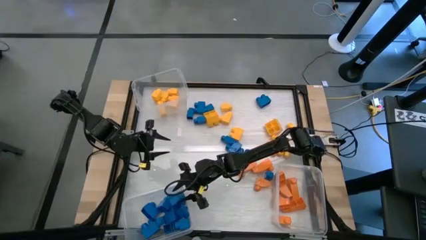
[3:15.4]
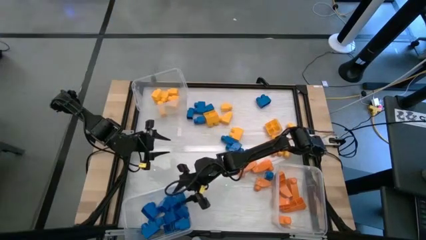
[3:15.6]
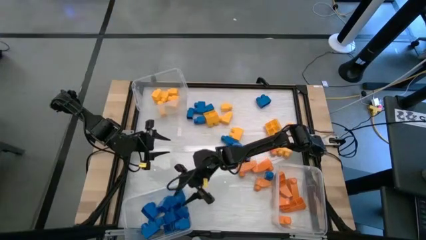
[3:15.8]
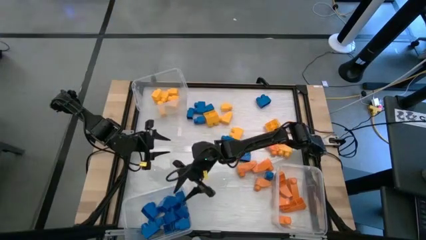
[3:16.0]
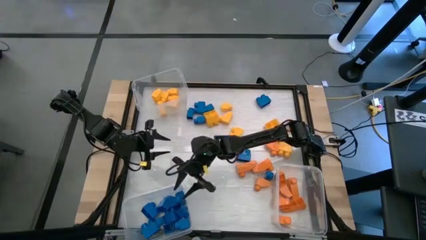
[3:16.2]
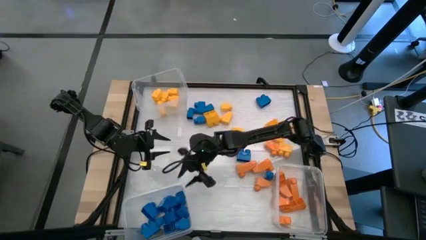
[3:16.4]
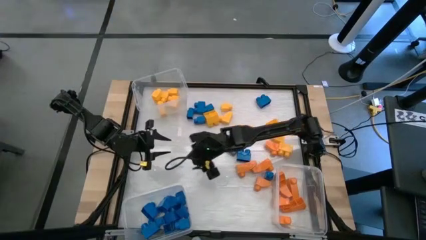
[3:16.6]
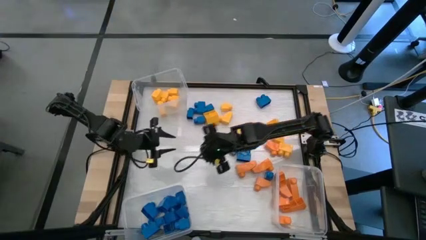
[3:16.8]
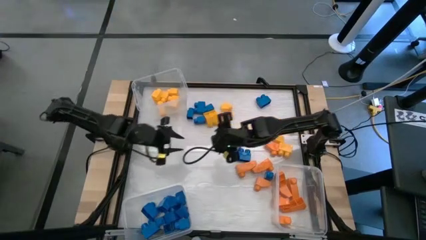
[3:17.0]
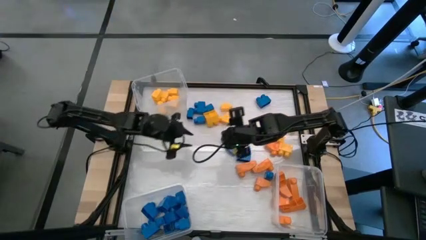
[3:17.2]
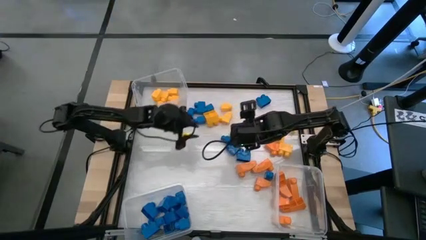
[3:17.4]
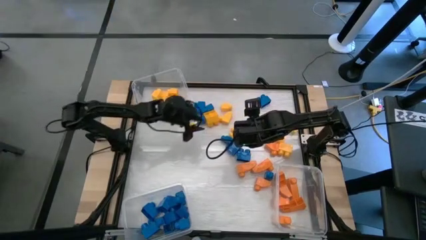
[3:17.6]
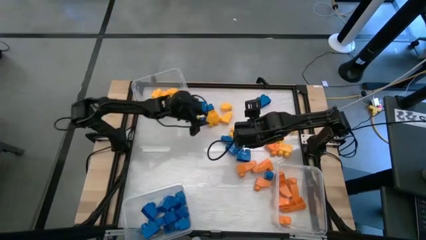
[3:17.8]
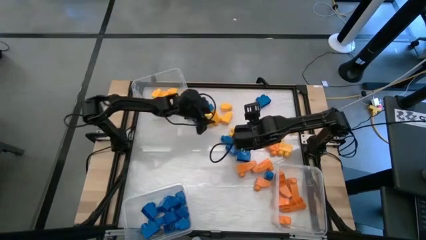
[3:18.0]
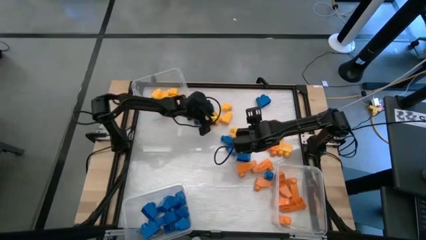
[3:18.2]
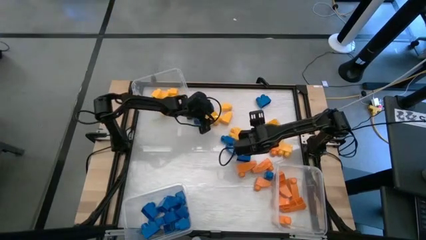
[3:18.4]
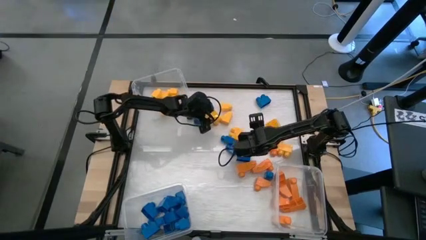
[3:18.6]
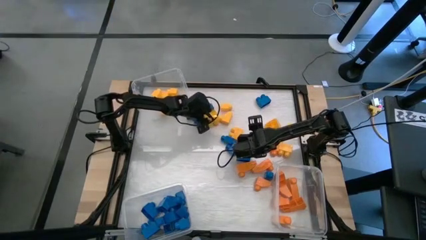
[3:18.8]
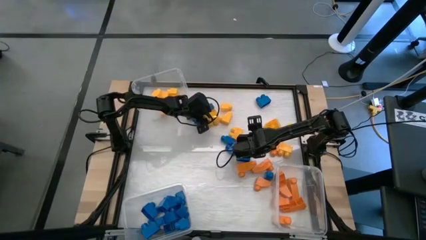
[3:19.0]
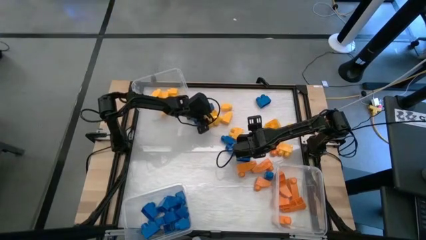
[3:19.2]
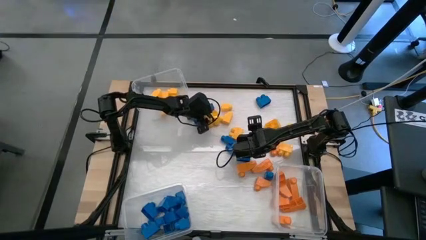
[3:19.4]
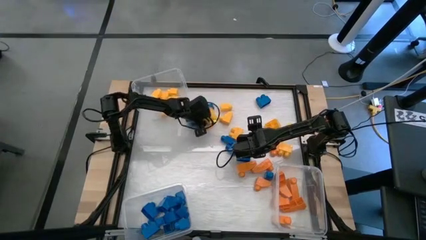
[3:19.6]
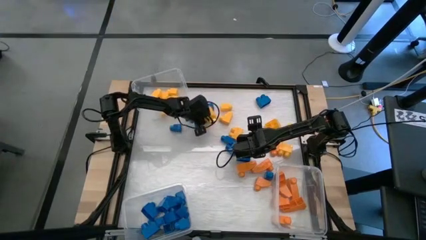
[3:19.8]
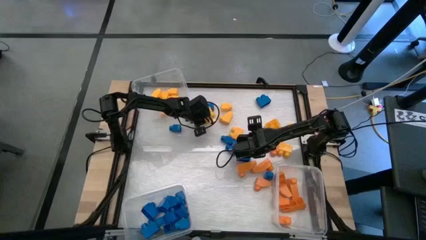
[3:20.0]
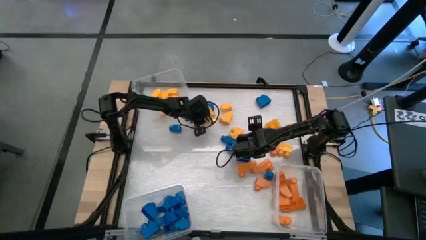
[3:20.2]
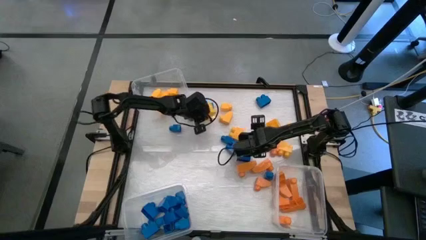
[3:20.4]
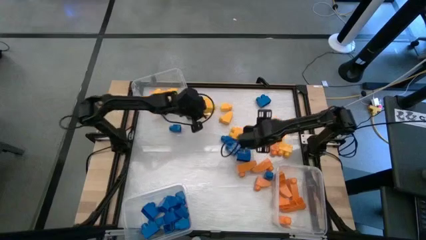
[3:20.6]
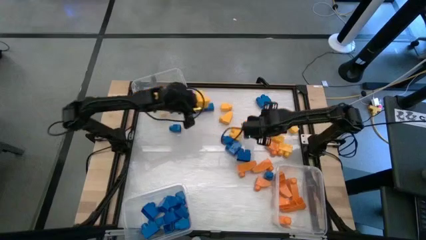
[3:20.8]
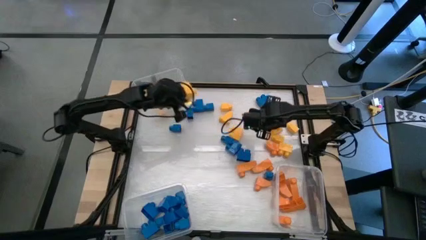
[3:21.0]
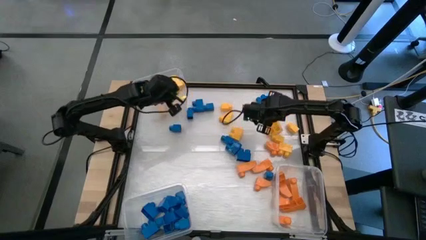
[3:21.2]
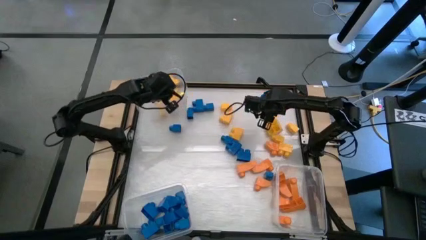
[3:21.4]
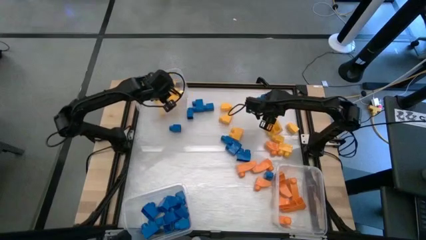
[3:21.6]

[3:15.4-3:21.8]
Task: Sort blocks
Put the yellow game piece into the top transparent bin

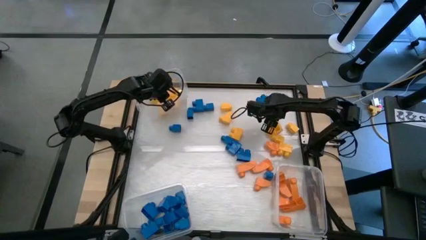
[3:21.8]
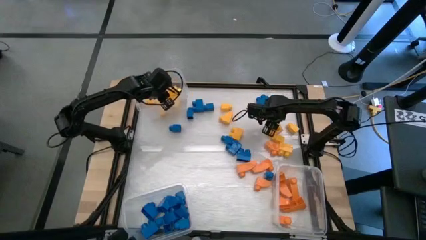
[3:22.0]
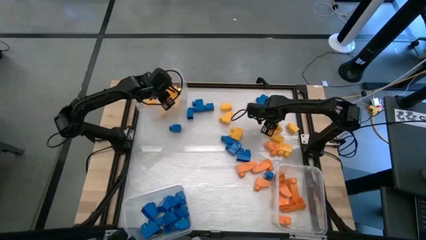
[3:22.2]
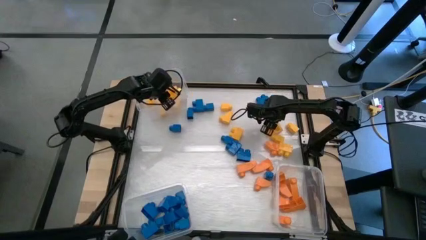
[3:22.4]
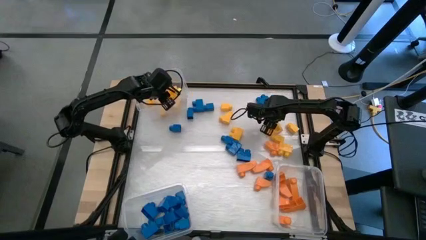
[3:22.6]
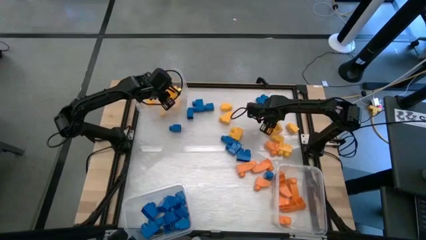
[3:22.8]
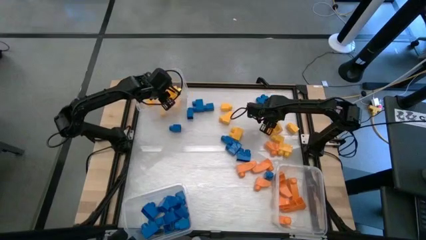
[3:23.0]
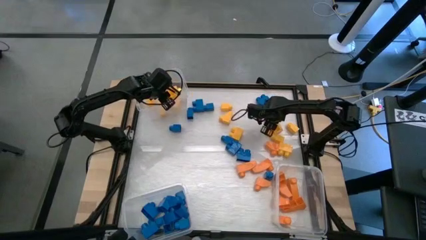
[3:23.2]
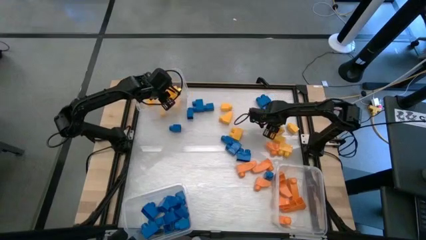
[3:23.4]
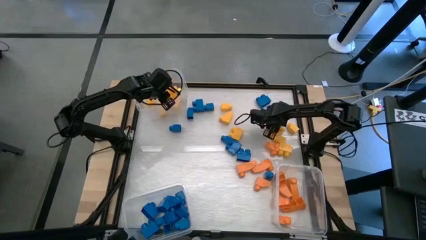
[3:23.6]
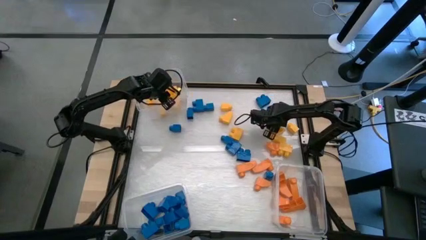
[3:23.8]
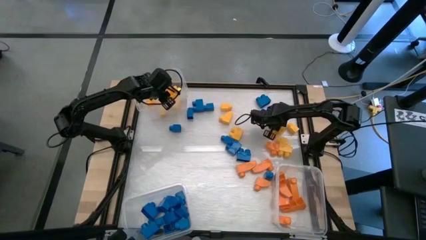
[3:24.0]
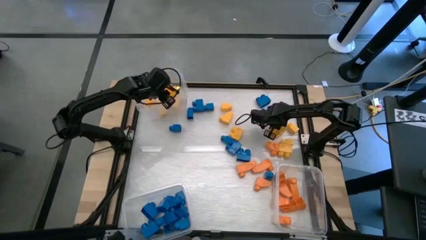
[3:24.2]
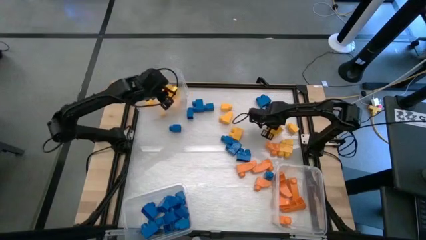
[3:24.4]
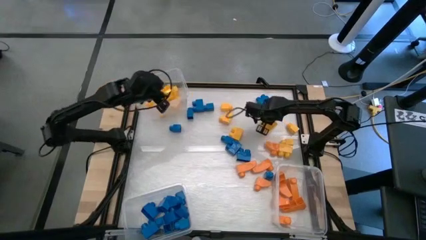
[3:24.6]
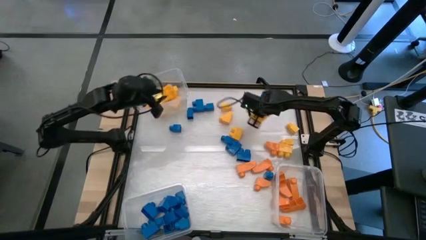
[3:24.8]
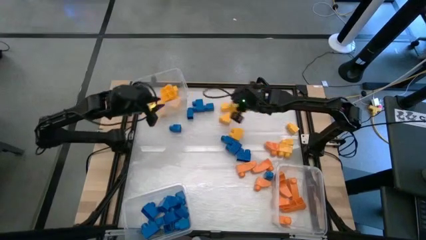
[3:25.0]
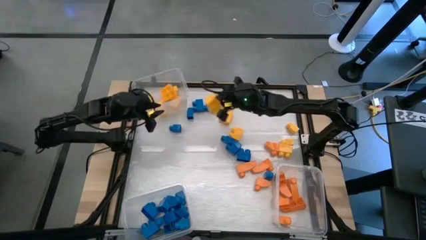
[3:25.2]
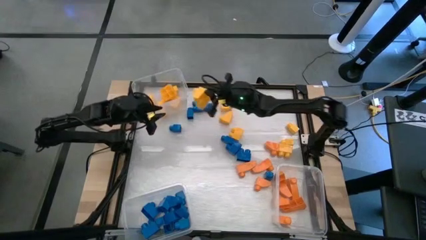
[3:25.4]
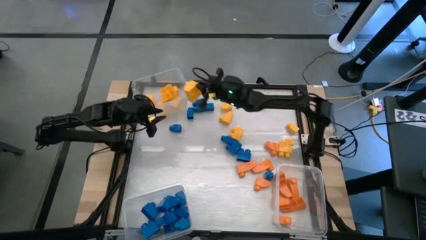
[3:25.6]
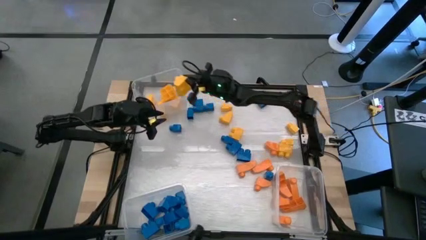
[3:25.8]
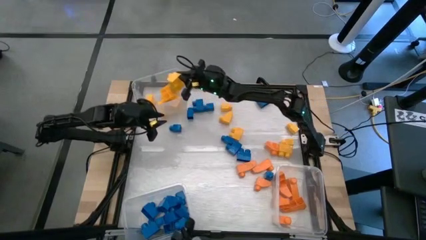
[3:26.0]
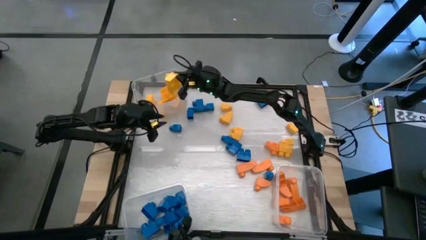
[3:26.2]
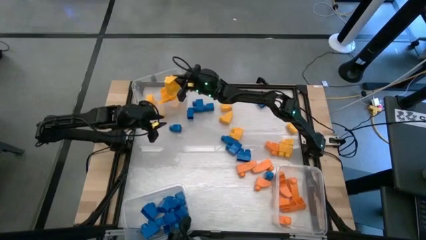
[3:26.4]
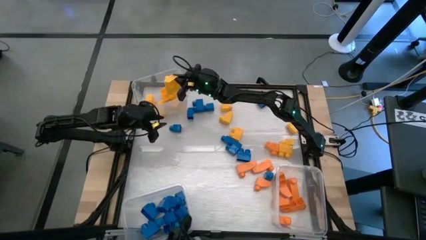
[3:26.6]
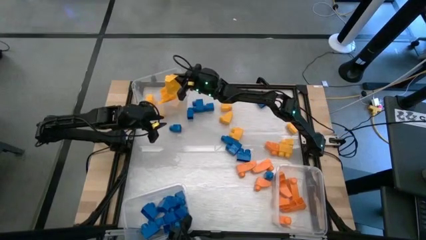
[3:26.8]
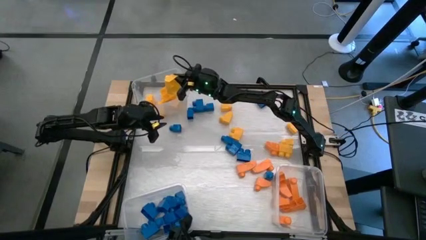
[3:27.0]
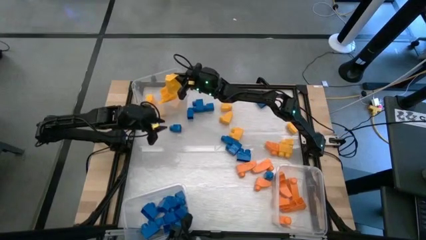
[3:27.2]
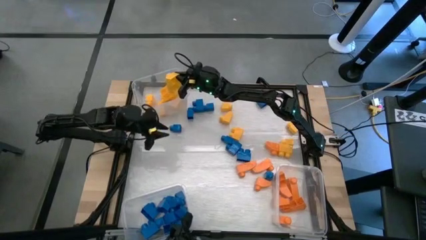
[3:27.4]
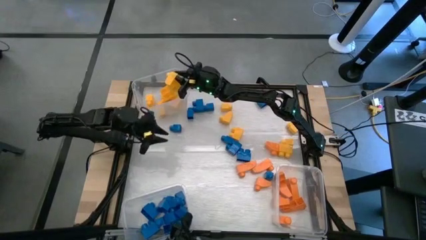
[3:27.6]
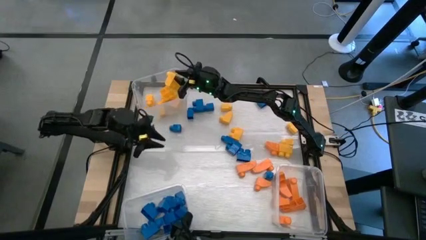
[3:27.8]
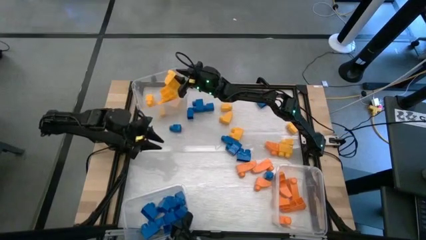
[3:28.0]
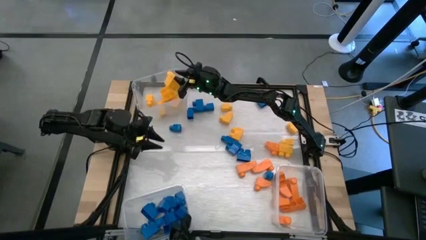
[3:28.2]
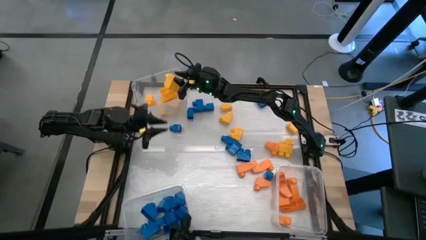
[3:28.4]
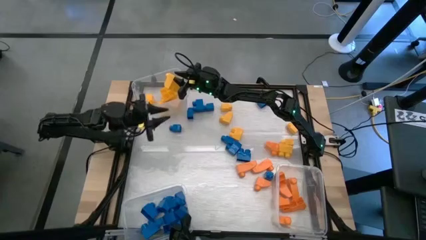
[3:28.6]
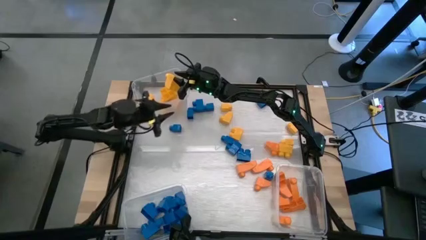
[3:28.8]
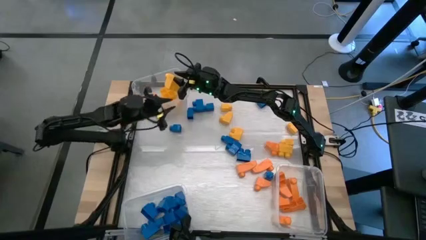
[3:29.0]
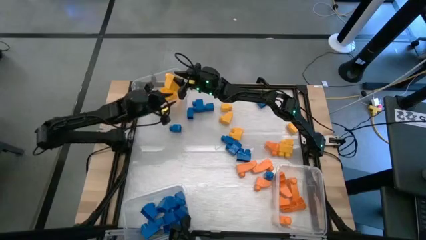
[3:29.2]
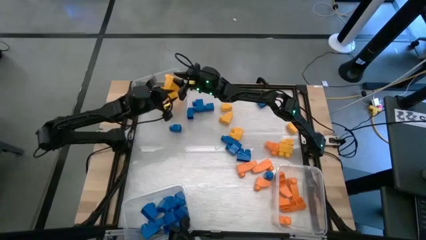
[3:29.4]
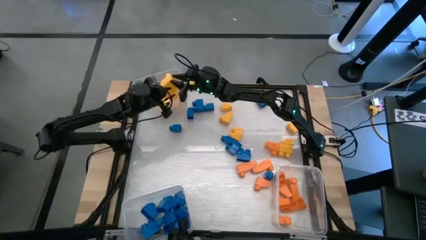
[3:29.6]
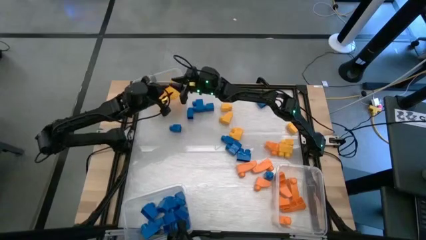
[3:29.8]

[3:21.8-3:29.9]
Put the yellow game piece into the top transparent bin

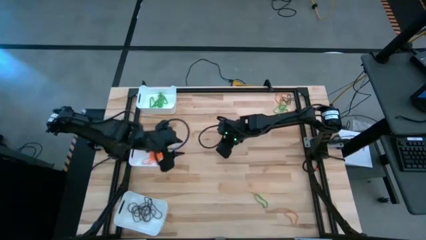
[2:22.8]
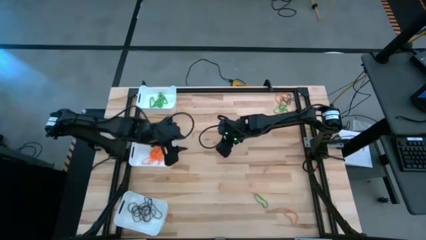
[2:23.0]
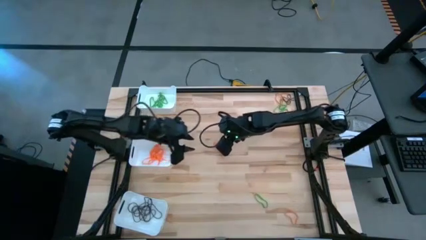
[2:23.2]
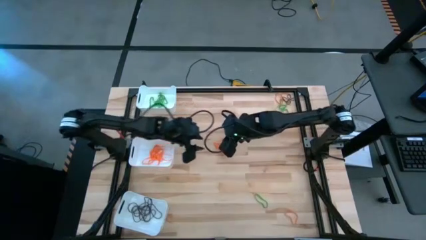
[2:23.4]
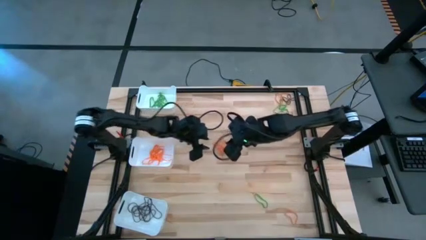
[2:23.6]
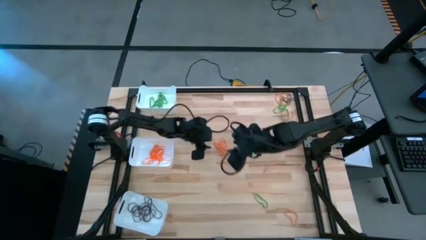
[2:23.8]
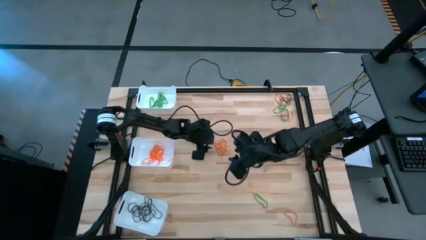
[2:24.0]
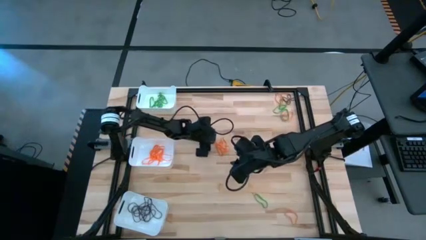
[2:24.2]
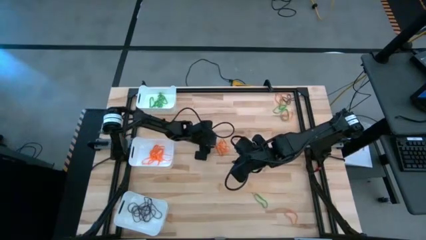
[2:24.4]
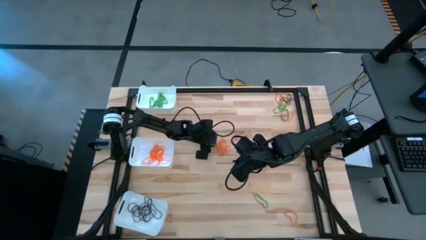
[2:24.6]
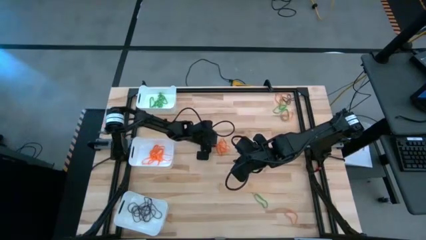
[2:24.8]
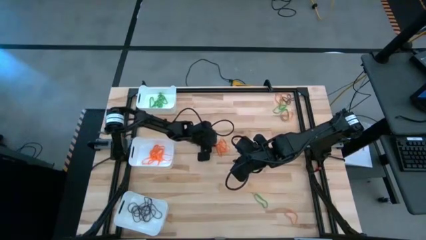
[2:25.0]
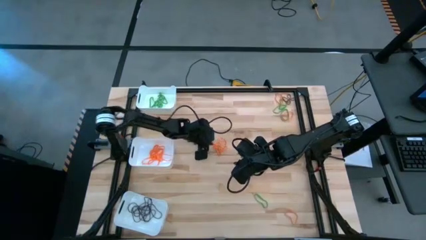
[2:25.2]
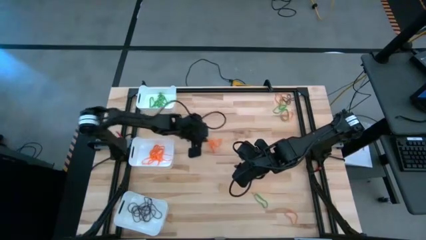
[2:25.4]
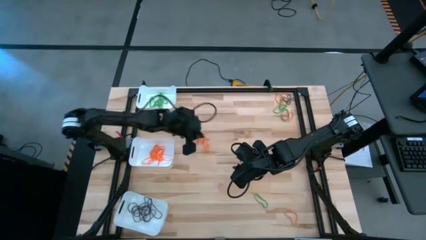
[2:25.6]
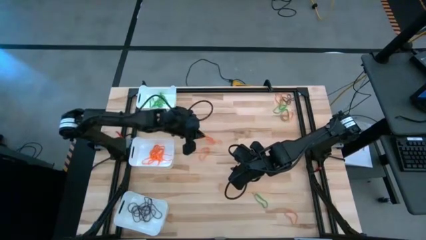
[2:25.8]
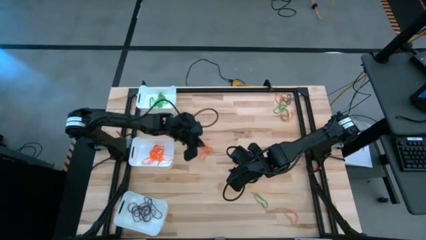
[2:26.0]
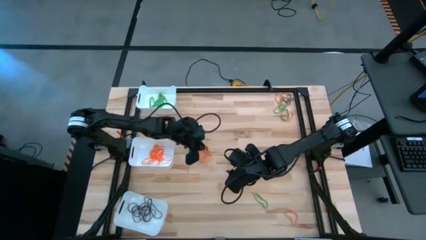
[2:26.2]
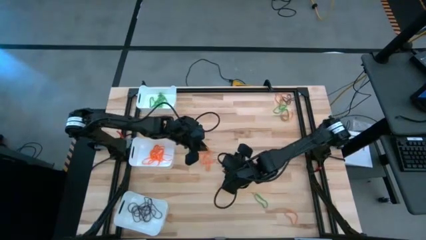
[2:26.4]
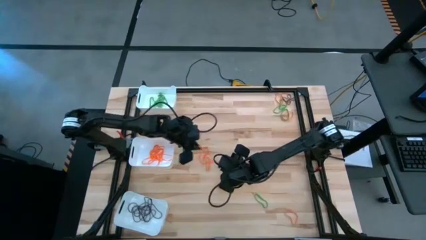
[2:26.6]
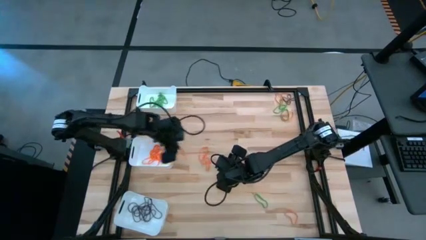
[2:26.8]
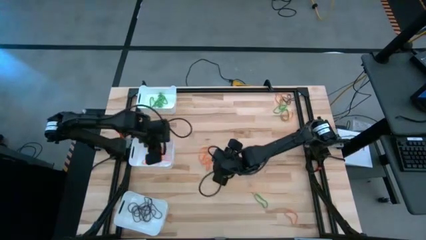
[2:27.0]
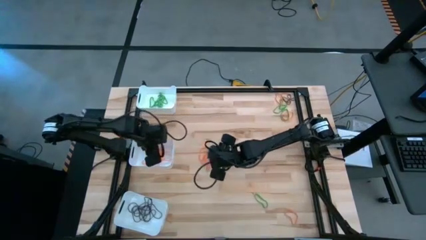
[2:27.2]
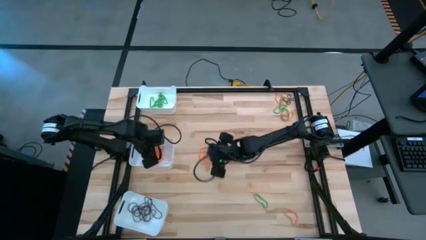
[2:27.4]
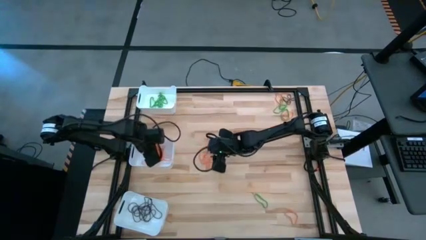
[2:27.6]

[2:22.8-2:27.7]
Task: Sort rubber bands into baskets
Put the orange rubber band into the middle white bin
